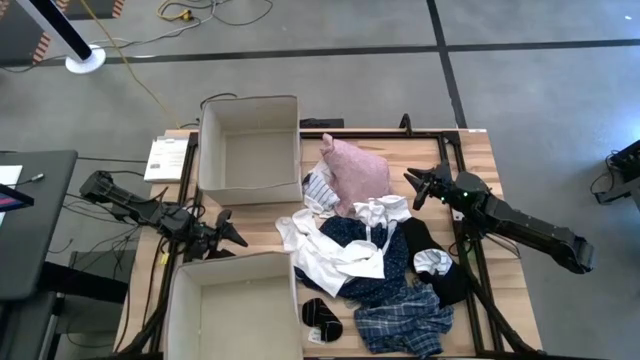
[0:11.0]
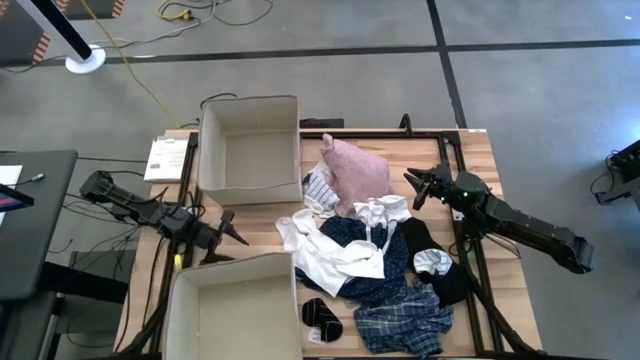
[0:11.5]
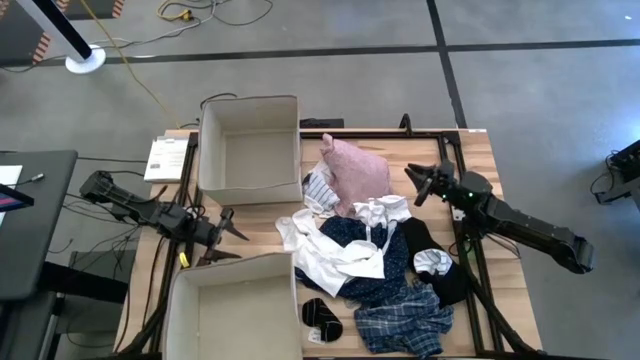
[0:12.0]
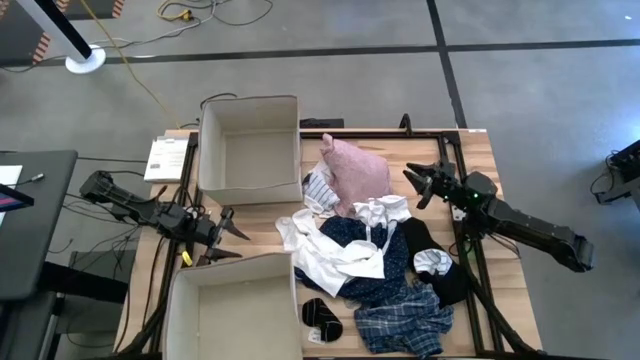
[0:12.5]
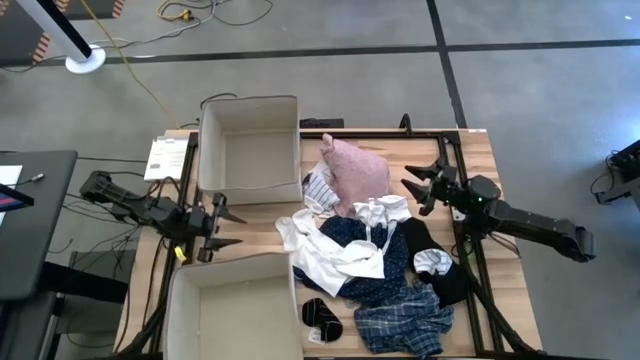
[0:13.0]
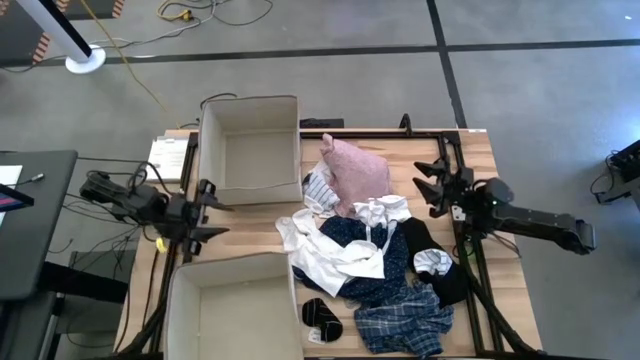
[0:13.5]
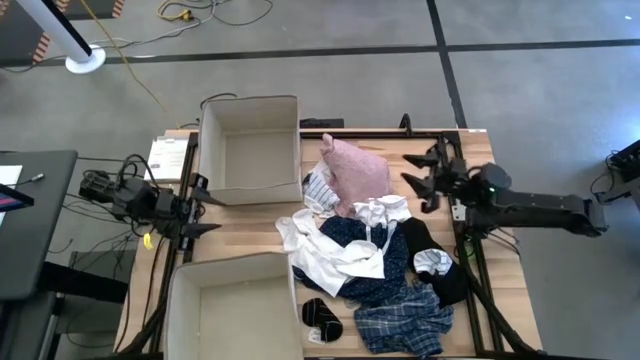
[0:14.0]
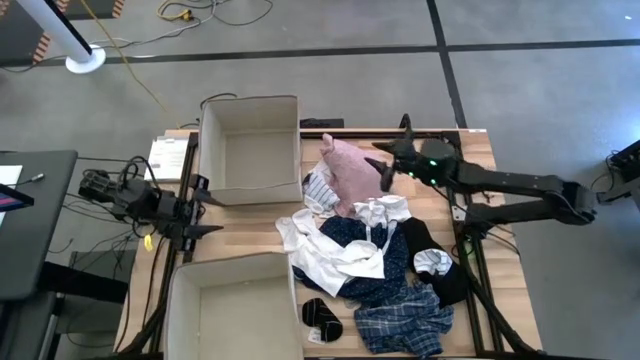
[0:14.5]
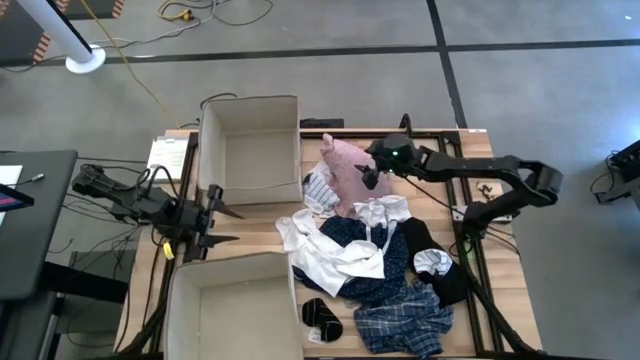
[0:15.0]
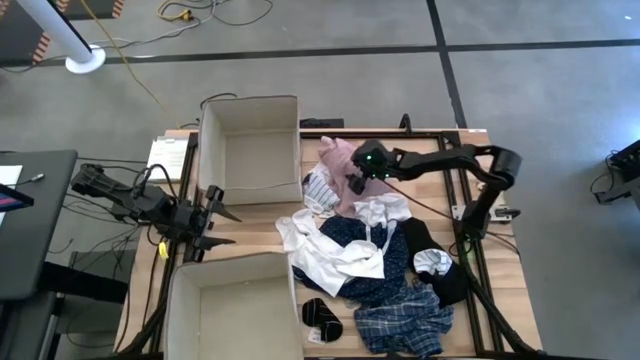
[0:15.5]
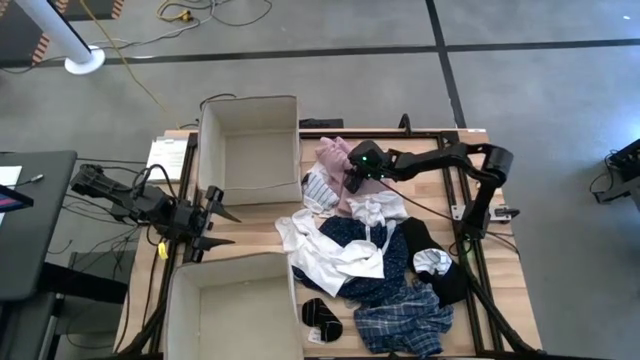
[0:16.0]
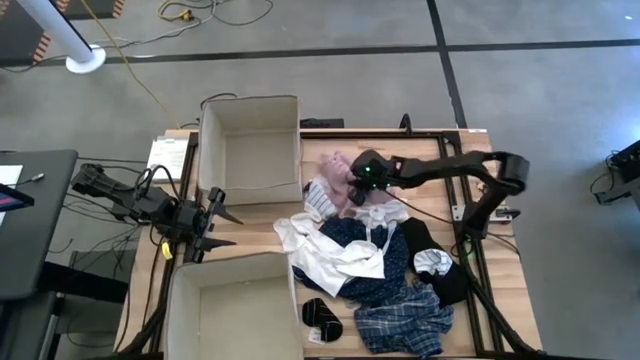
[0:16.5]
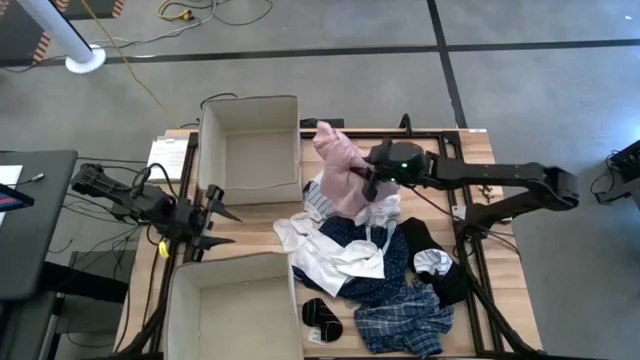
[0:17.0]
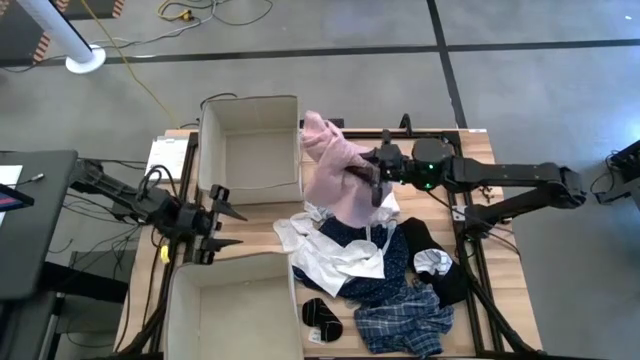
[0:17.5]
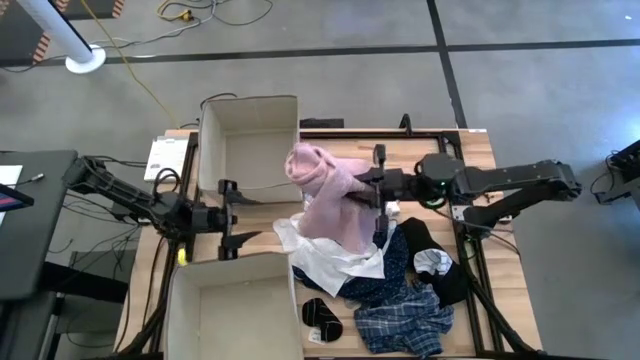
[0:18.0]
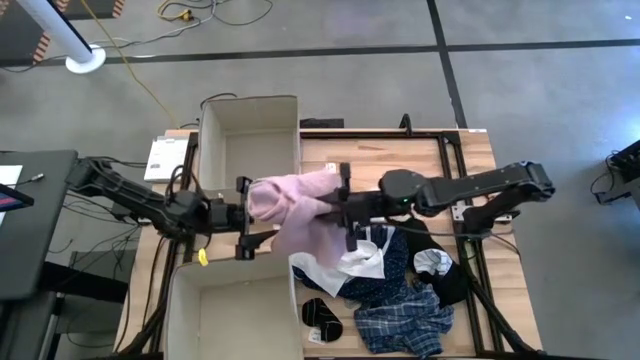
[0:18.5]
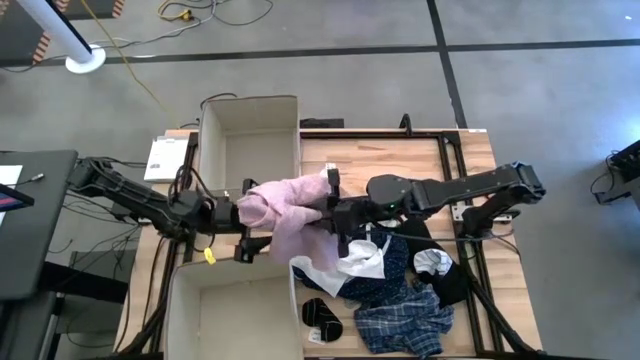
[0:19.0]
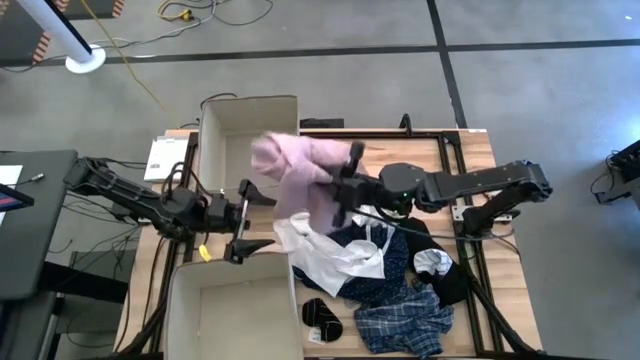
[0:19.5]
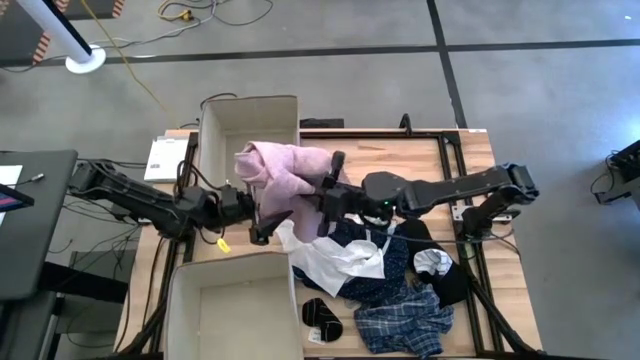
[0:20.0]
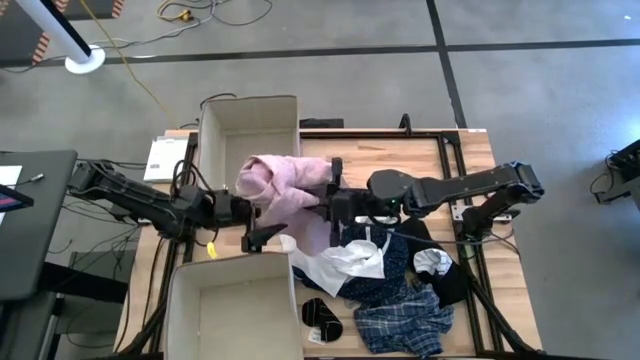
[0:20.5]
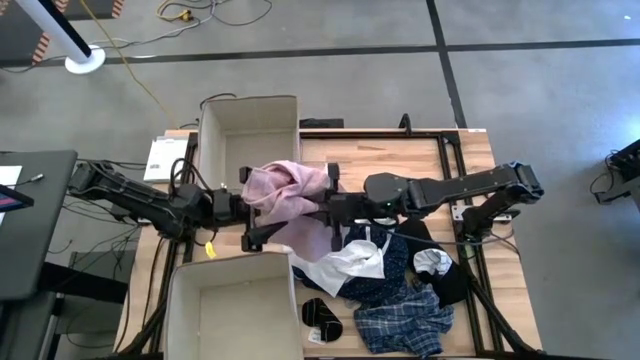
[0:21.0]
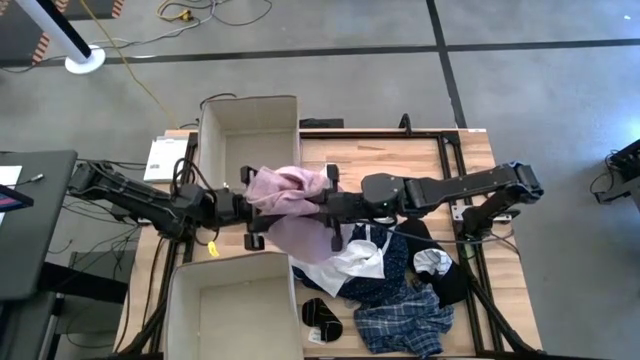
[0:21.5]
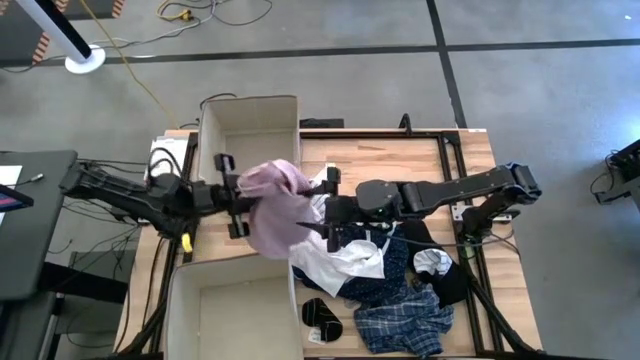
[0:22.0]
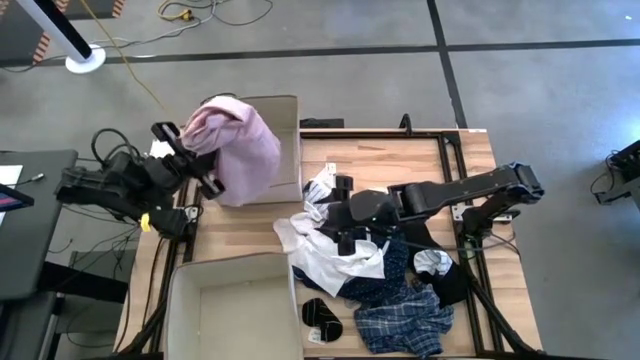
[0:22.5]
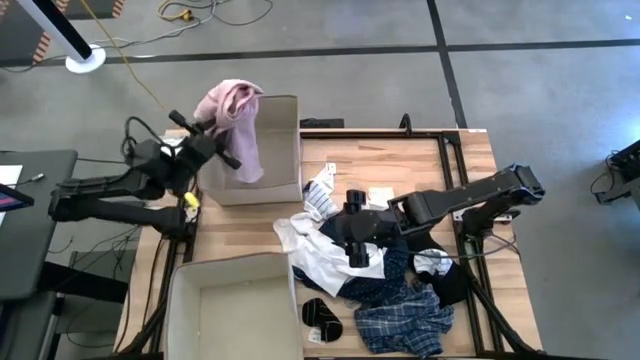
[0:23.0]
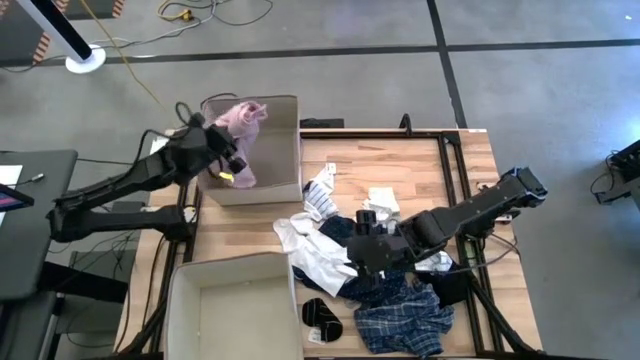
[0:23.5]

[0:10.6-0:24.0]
Task: Sort clothes
Put the pink trousers into the top light brown laundry organizer

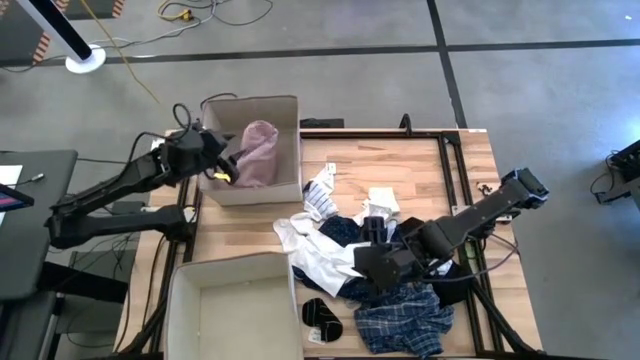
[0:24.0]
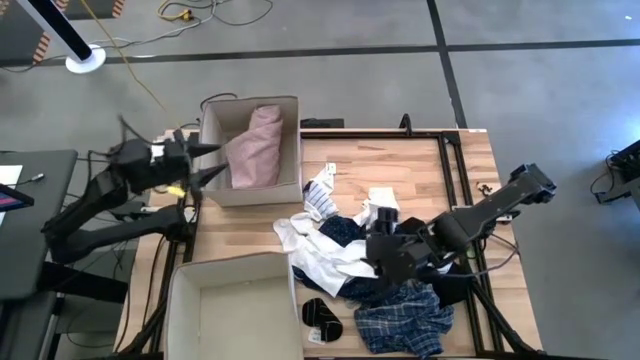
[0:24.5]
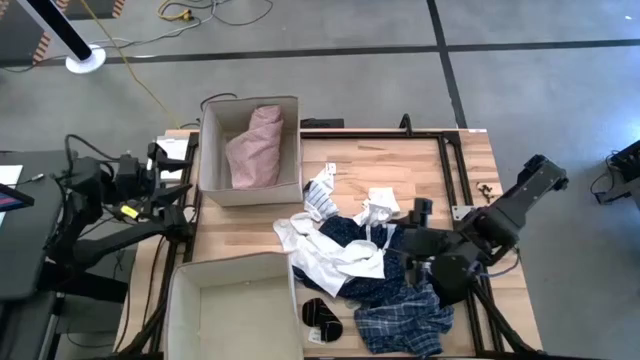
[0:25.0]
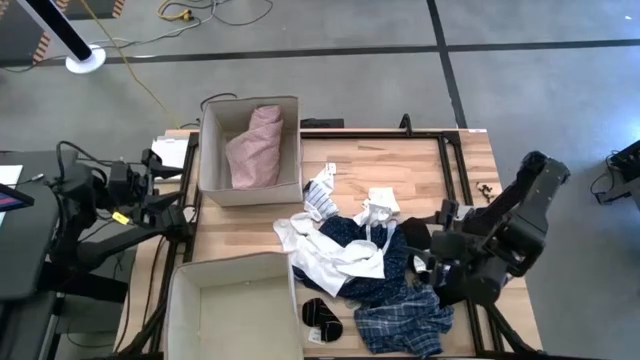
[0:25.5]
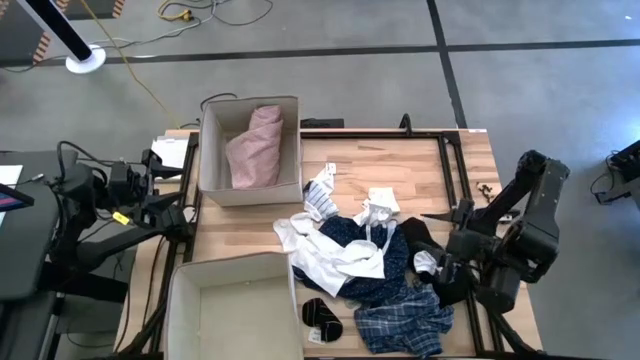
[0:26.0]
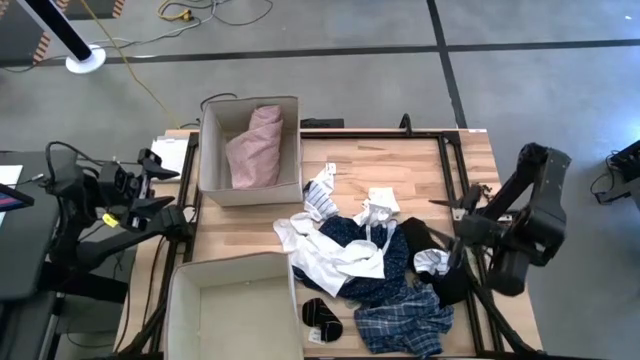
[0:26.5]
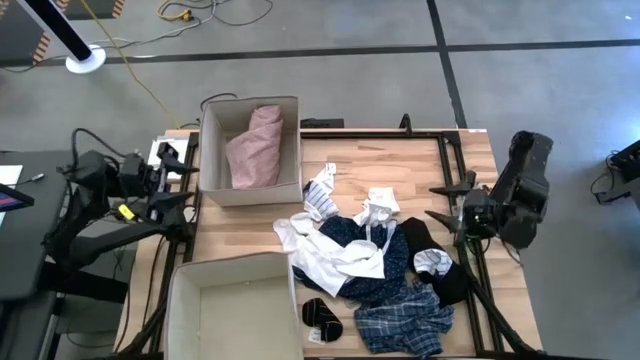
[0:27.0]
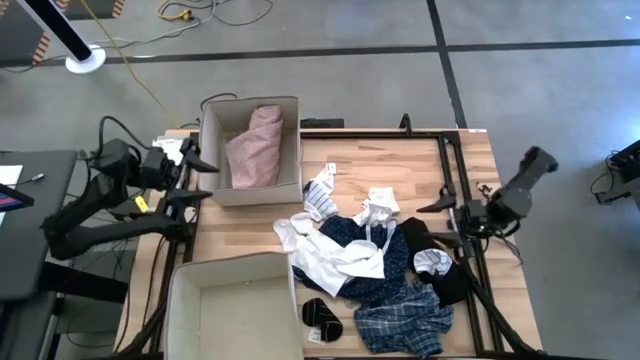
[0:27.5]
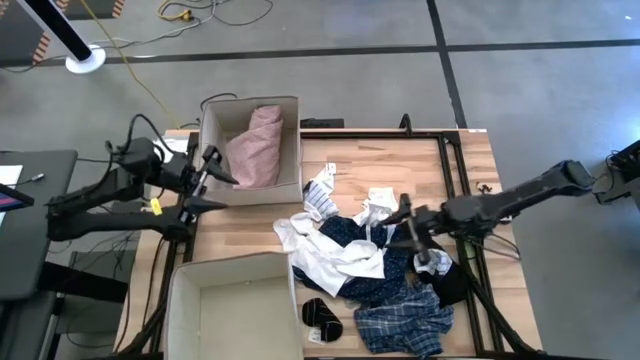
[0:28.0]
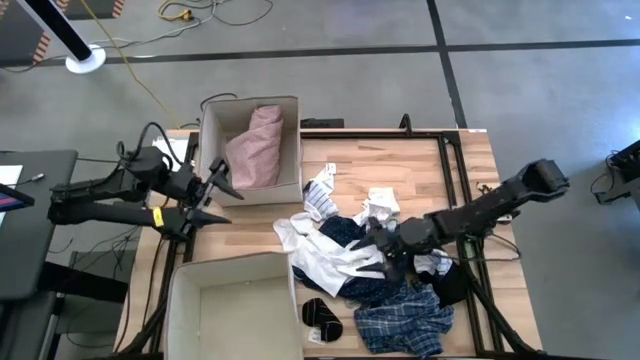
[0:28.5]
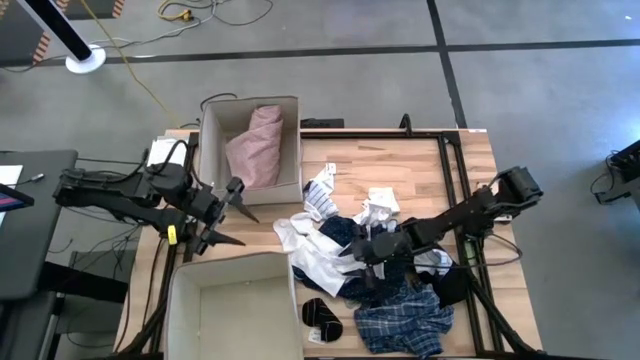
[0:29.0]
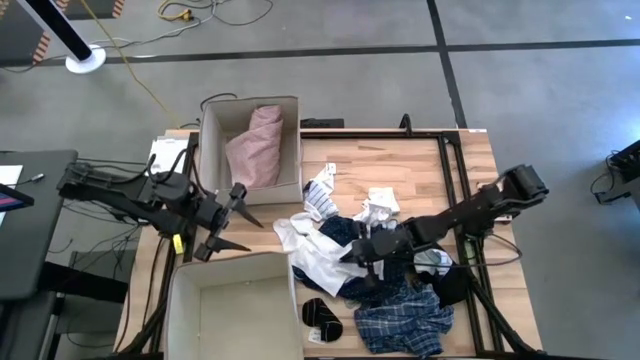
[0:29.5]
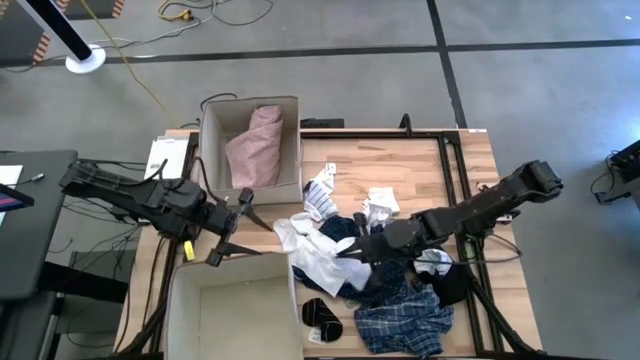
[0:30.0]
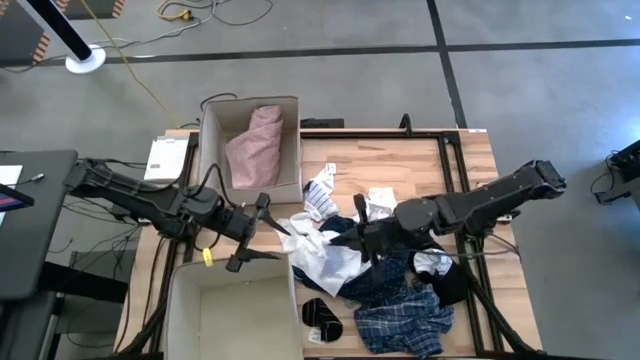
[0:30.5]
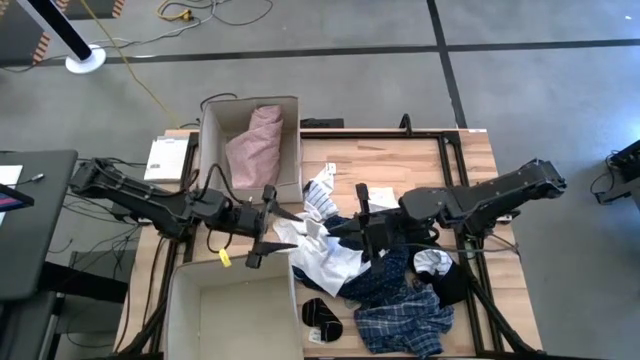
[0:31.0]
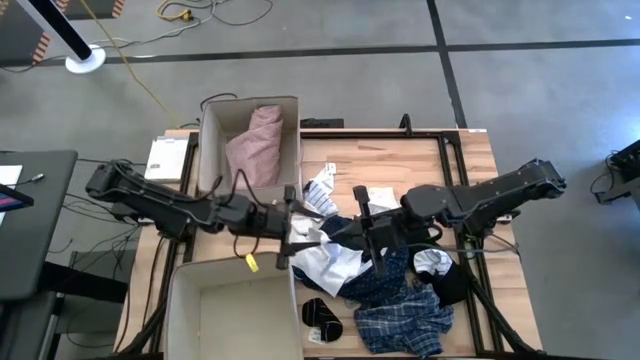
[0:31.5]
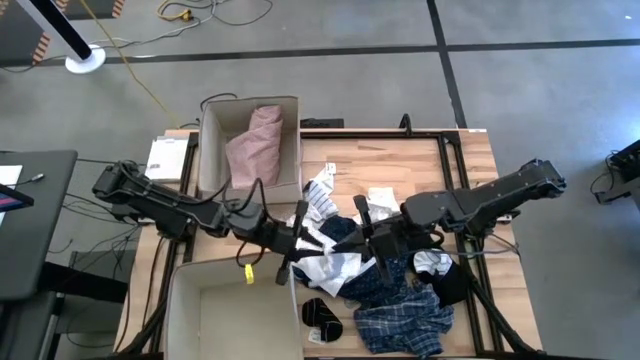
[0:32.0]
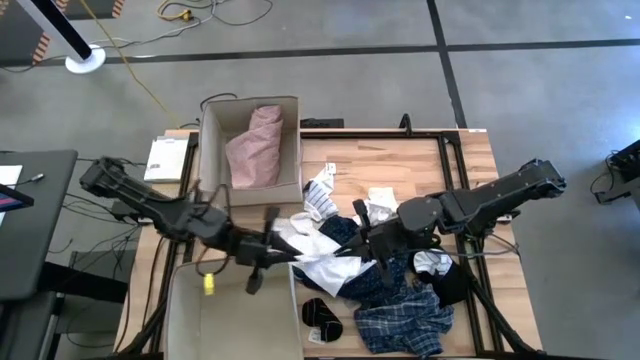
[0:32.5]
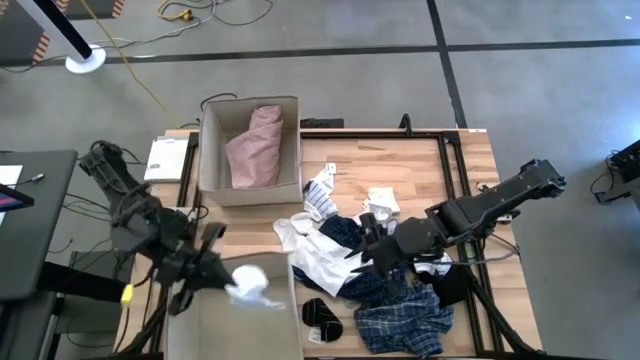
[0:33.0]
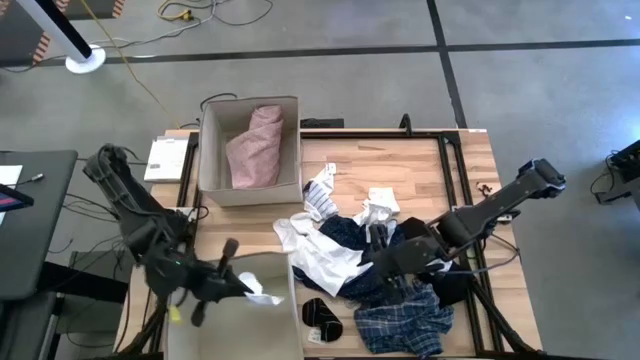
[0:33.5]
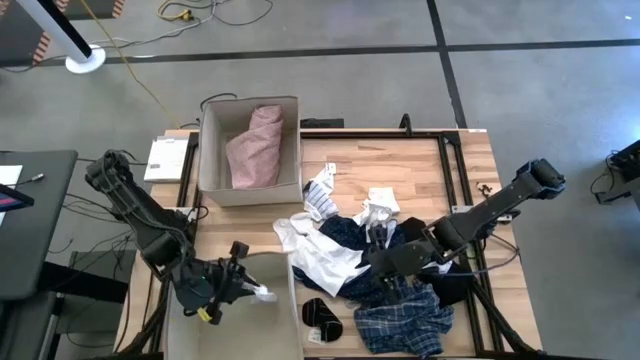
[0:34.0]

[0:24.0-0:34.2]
Put the white sock into the bottom light brown laundry organizer
